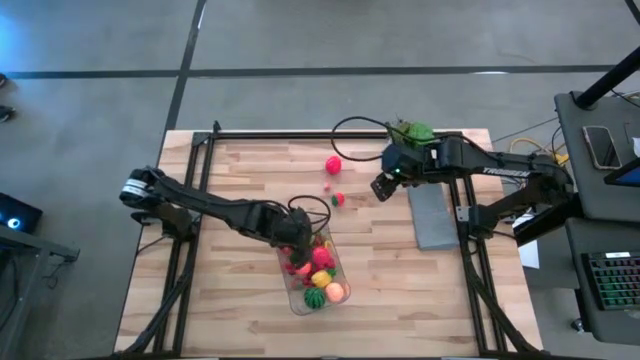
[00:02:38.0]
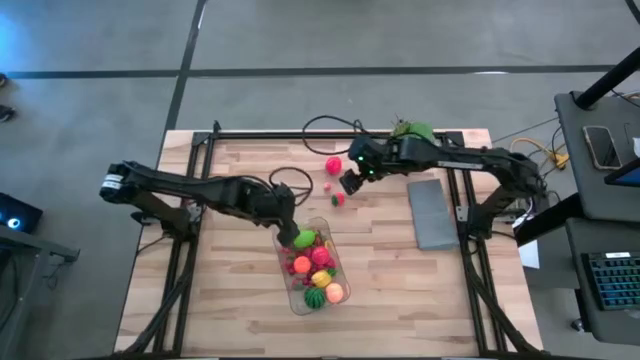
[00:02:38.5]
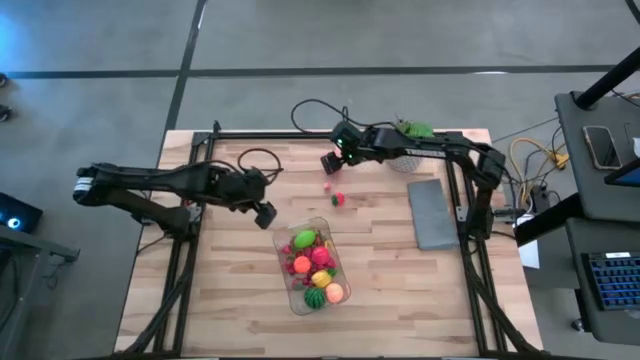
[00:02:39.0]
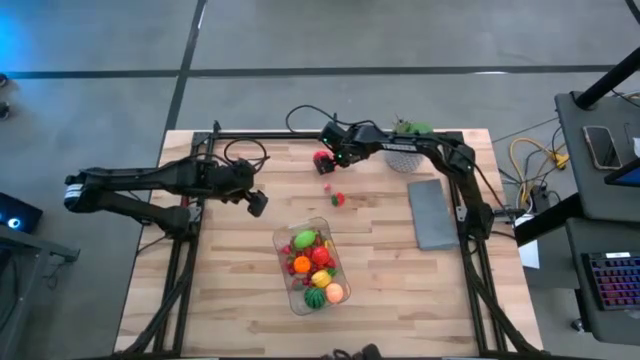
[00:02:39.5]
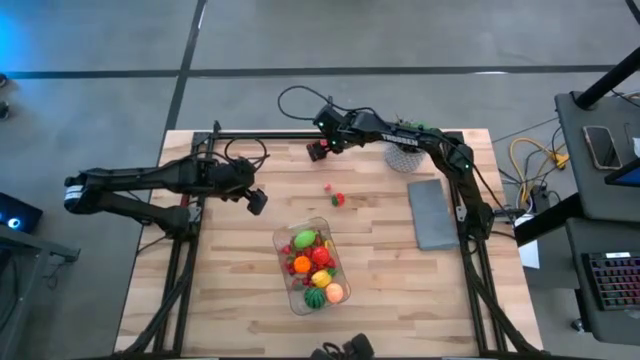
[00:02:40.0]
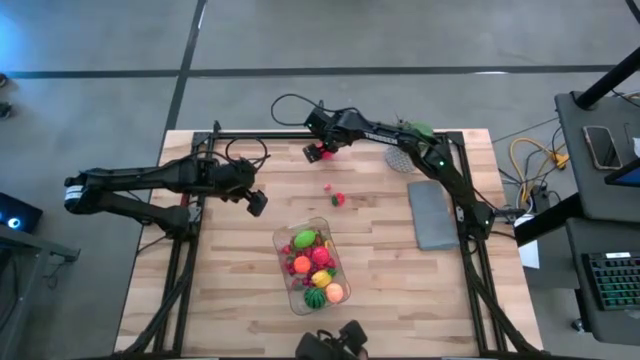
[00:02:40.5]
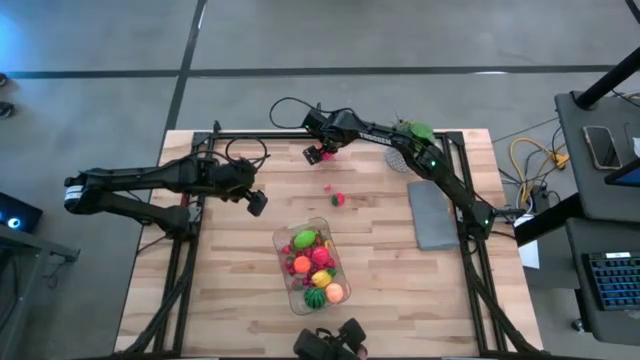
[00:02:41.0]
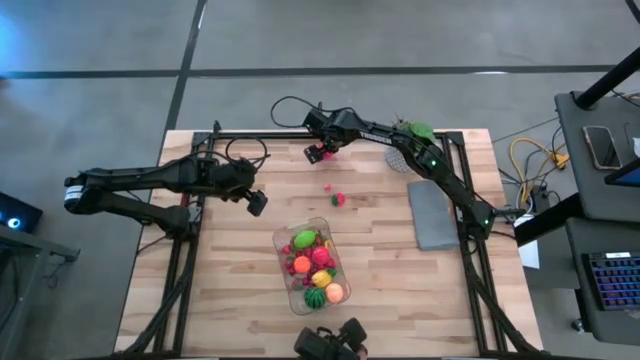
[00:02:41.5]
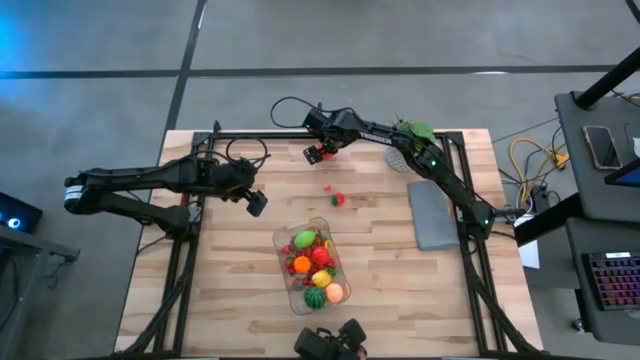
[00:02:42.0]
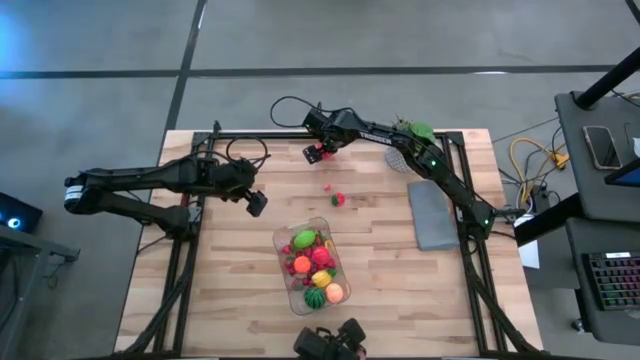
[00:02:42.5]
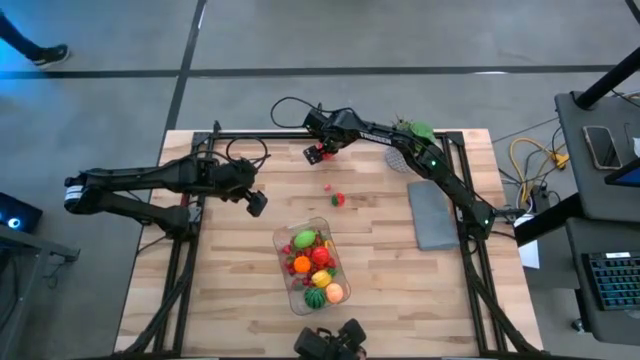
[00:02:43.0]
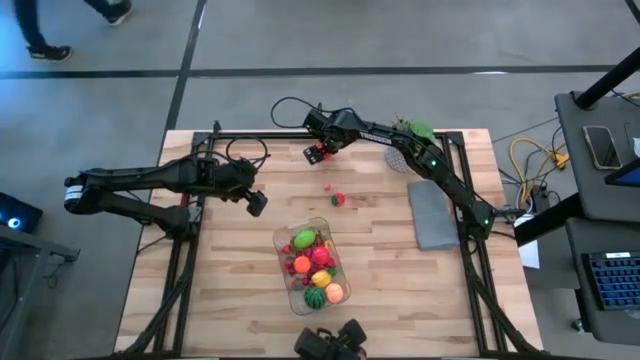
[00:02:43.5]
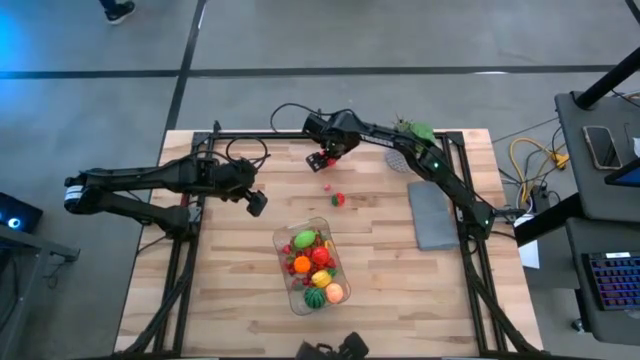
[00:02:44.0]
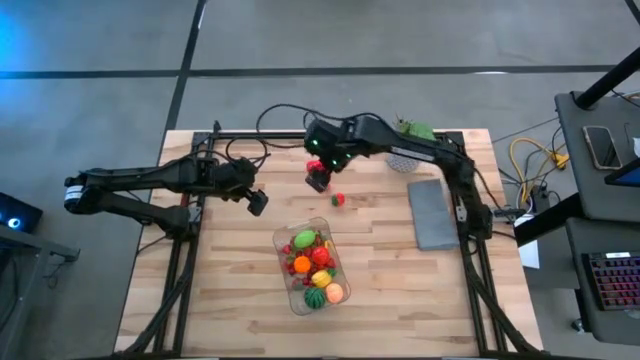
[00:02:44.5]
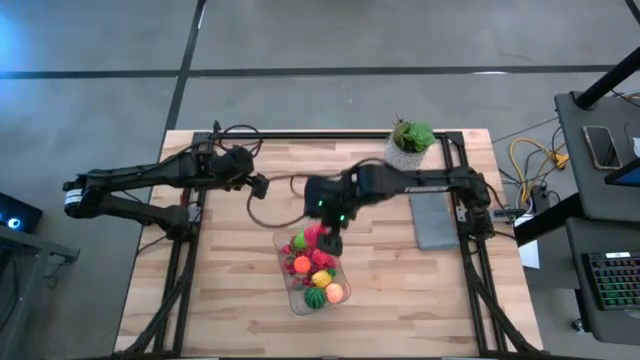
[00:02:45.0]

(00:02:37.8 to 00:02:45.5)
Task: Pick and placing Produce into tupperware
Put the red apple into the transparent bin

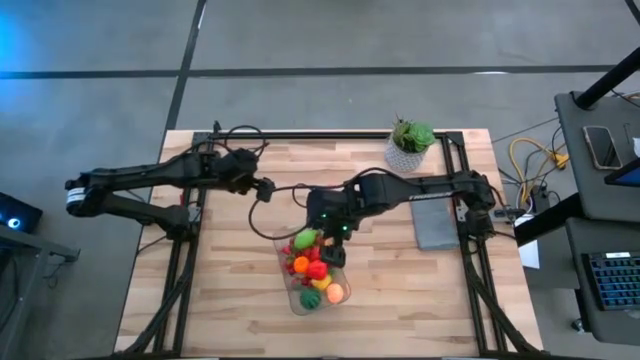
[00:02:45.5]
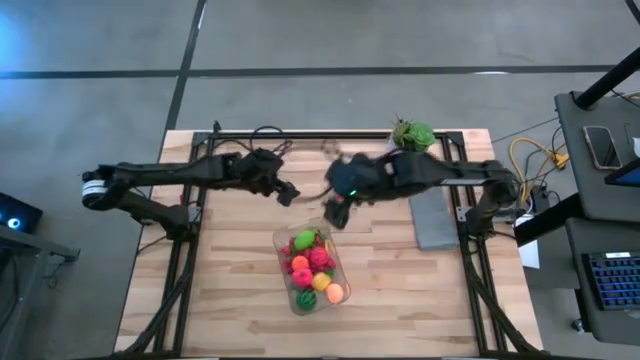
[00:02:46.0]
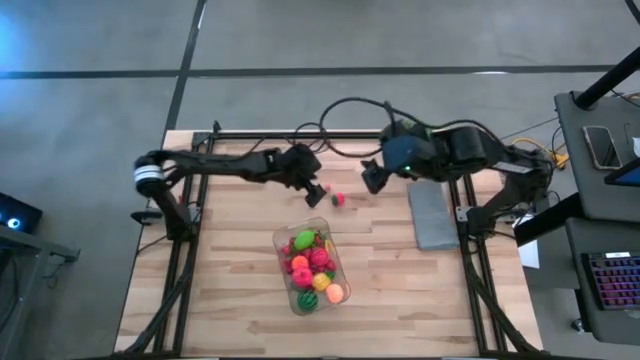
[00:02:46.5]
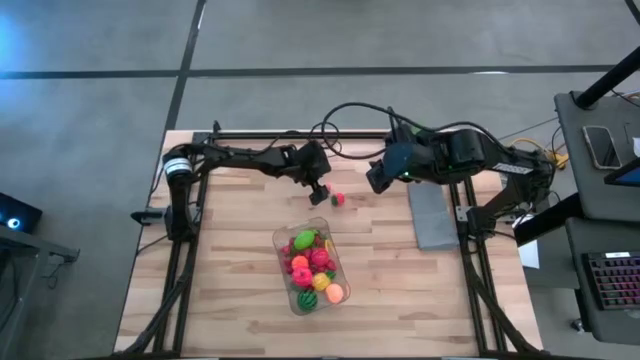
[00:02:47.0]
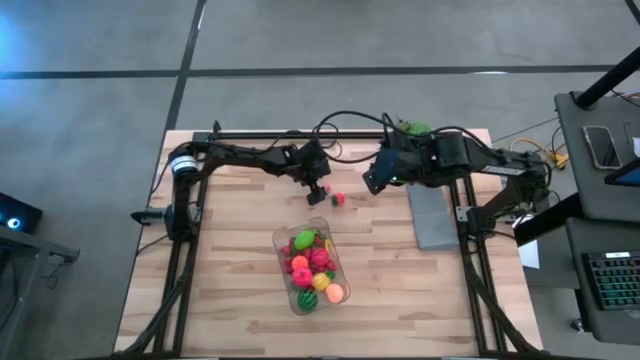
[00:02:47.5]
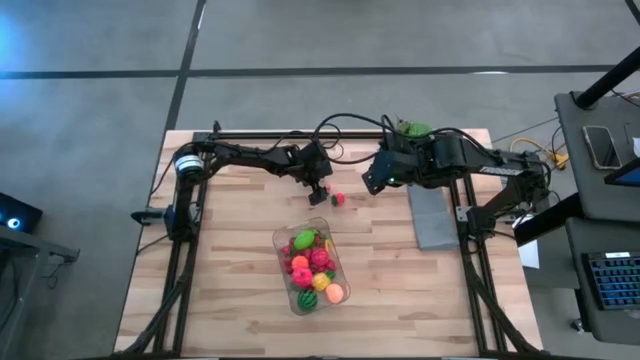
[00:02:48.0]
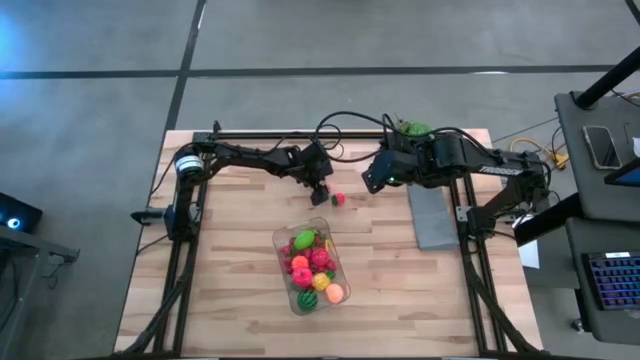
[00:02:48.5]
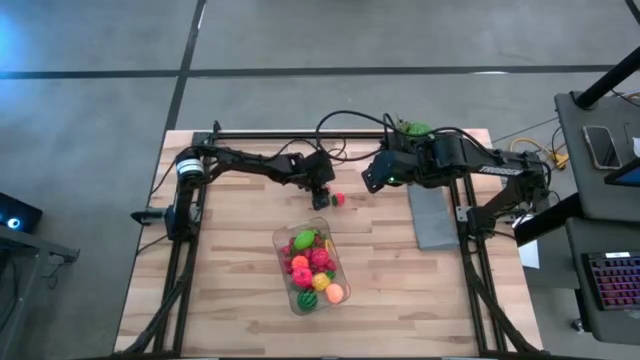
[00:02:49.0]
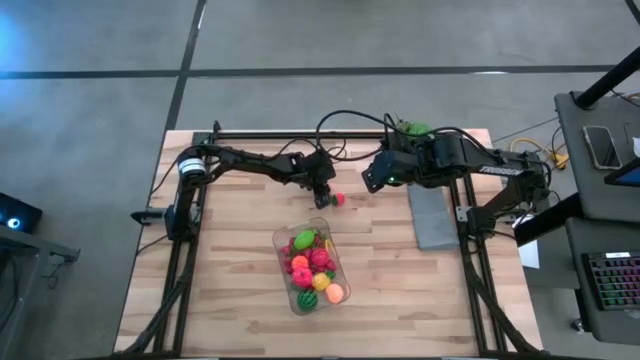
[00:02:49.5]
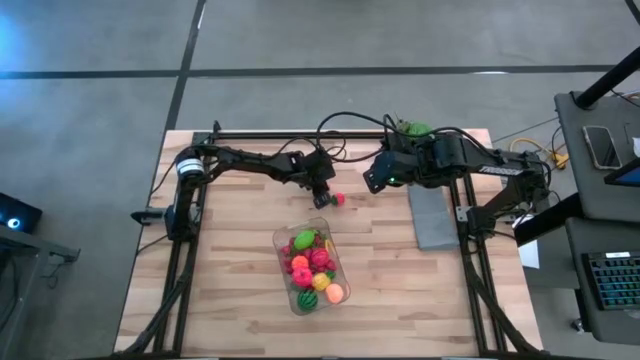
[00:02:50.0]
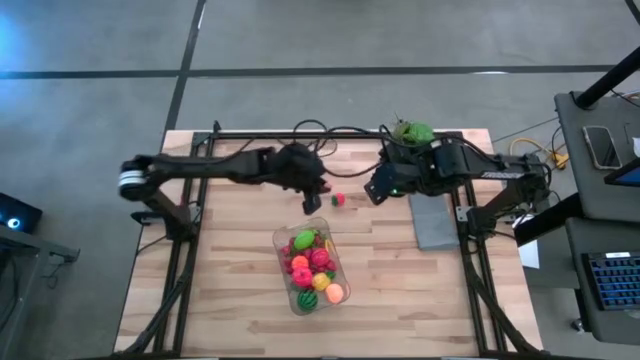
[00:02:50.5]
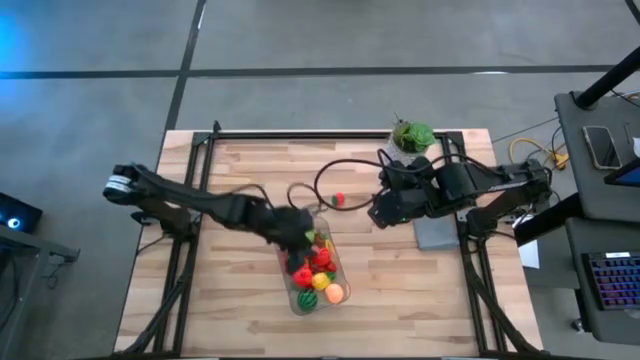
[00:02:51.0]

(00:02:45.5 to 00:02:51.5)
Put the pink peach into the transparent bin

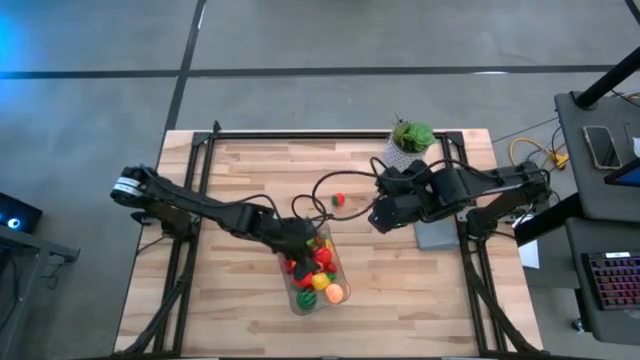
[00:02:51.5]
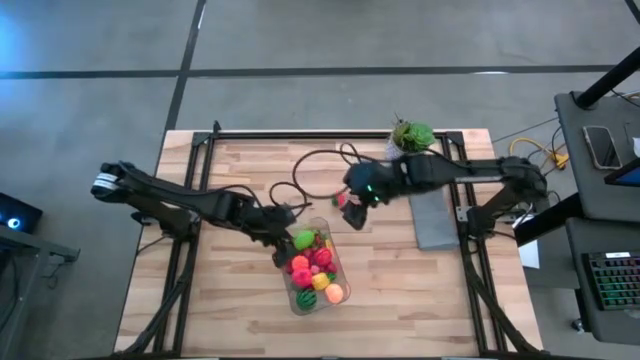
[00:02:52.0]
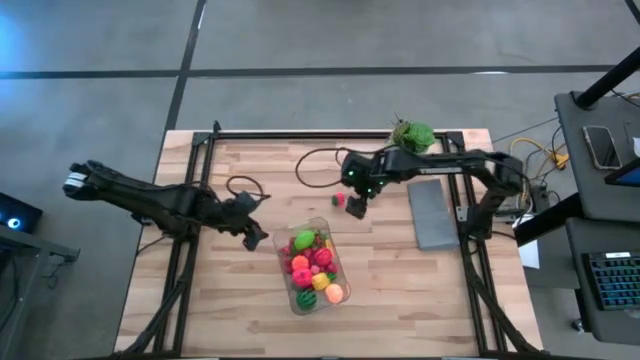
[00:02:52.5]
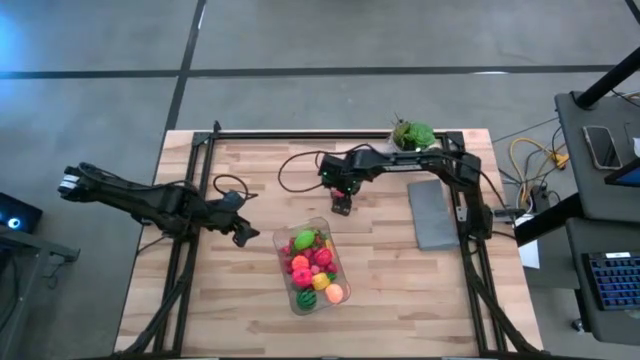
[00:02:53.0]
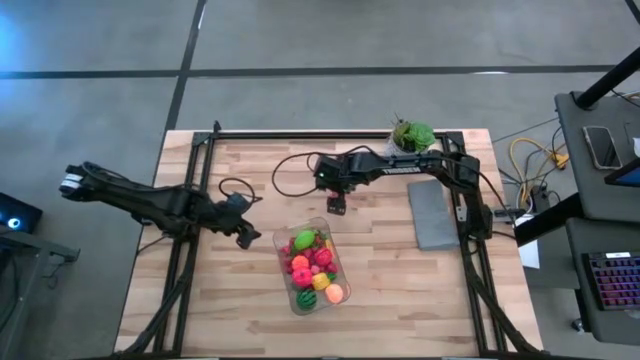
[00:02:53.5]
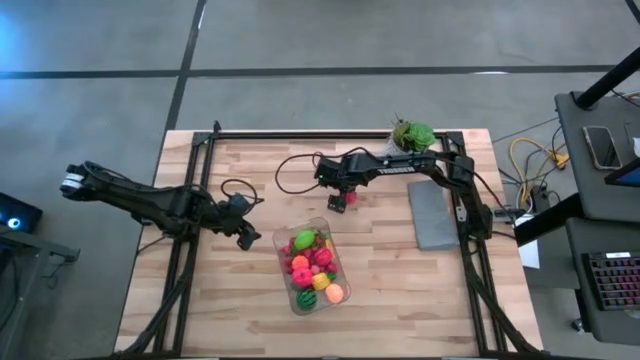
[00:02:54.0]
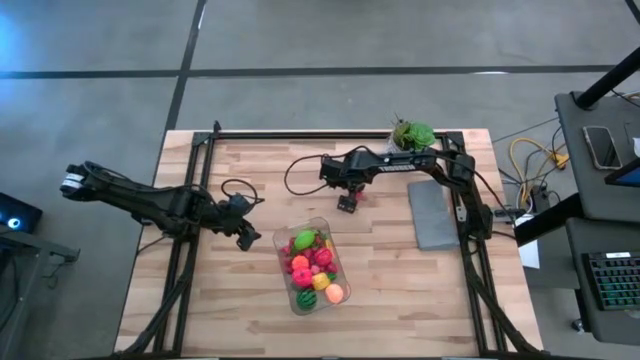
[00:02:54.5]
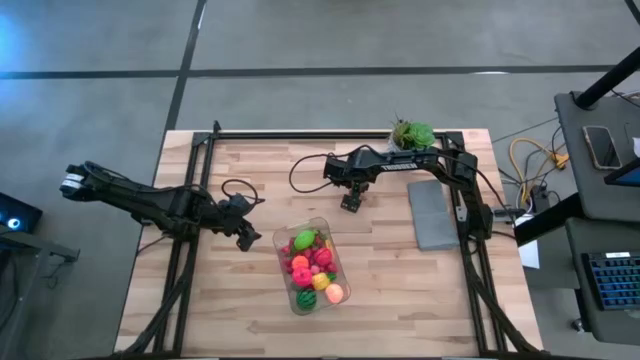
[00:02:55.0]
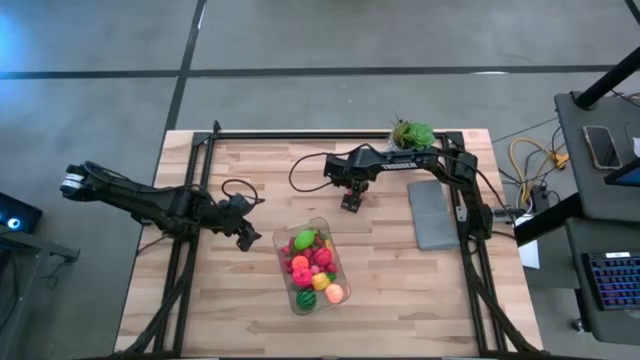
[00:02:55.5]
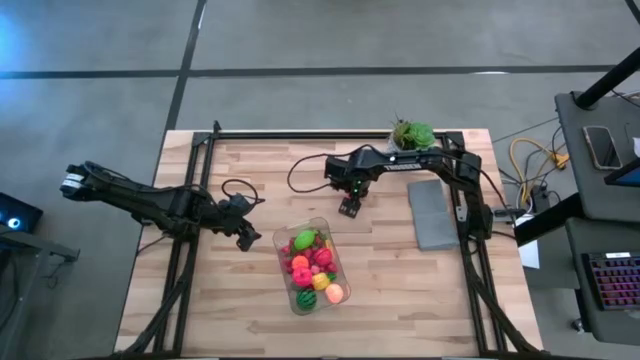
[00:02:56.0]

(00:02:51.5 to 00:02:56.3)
Put the red strawberry into the transparent bin

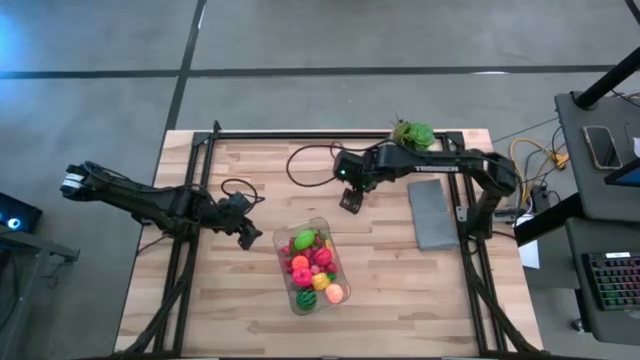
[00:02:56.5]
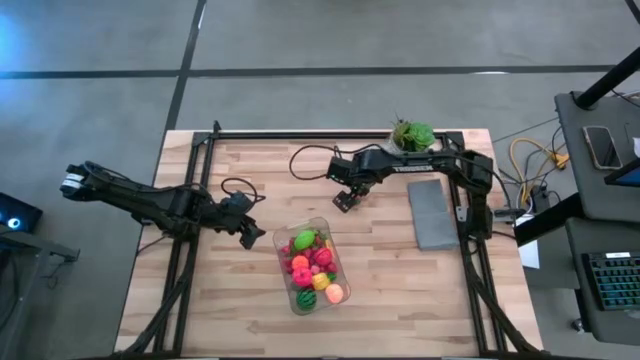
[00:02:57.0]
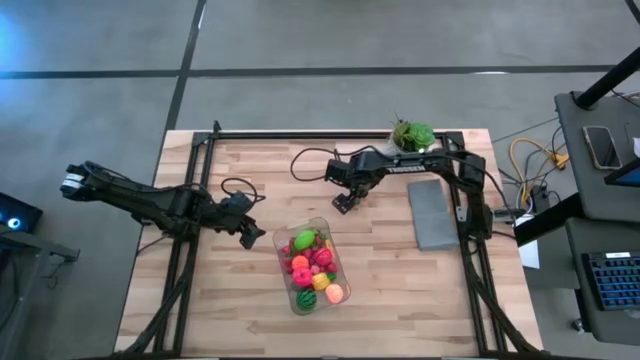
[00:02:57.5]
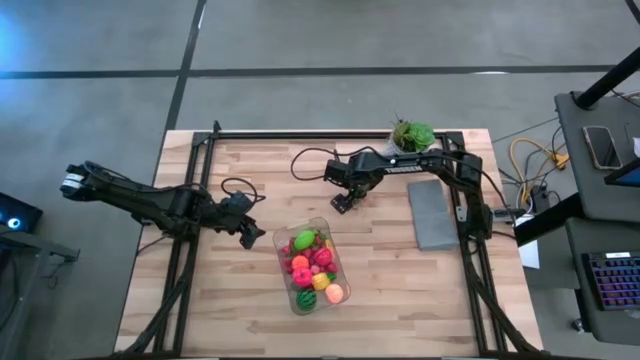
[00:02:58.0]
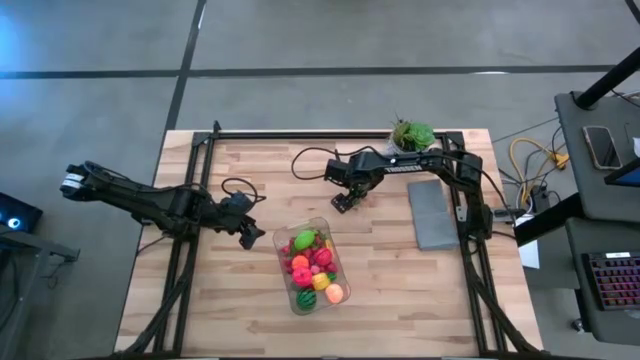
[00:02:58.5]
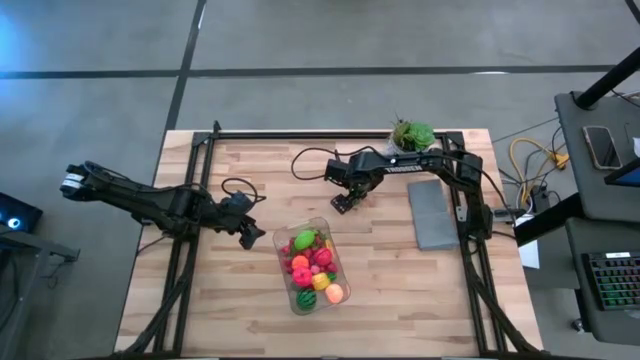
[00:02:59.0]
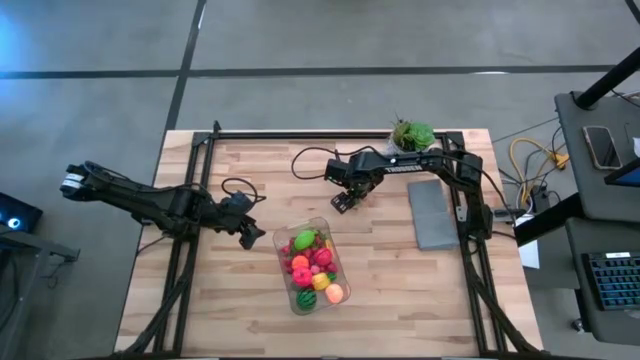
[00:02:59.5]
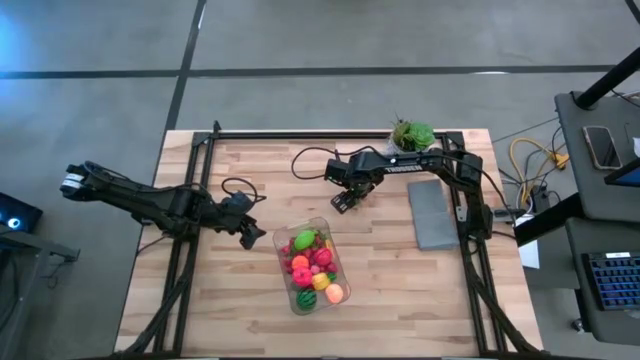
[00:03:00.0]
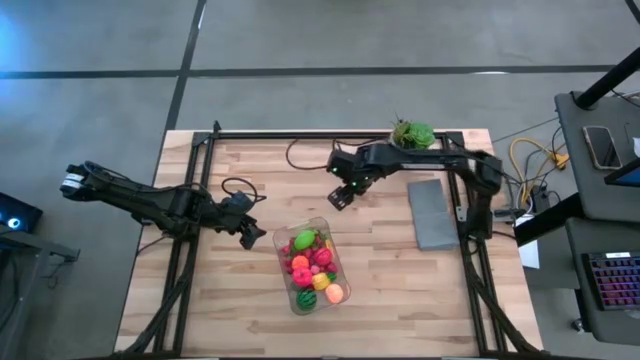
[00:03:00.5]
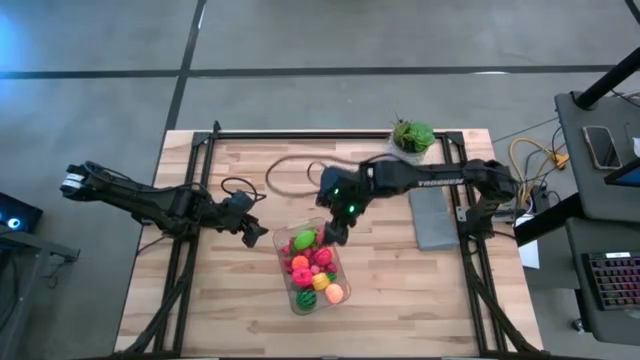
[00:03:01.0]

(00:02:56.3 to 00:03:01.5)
Put the red strawberry into the transparent bin
